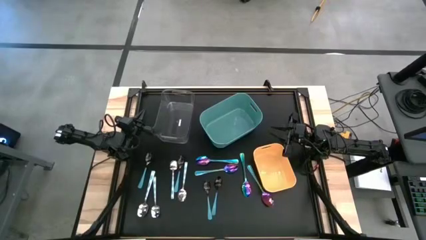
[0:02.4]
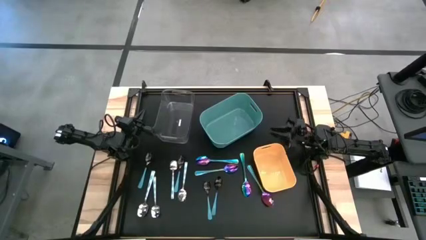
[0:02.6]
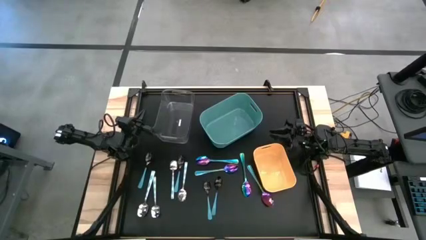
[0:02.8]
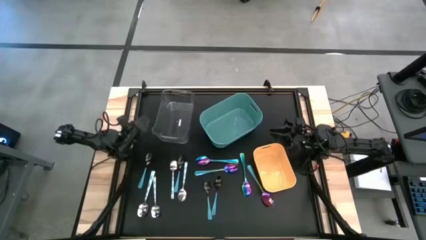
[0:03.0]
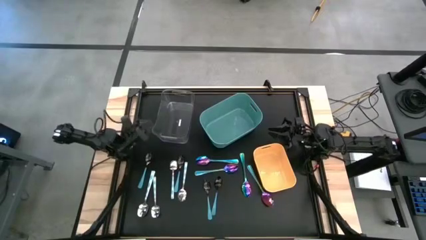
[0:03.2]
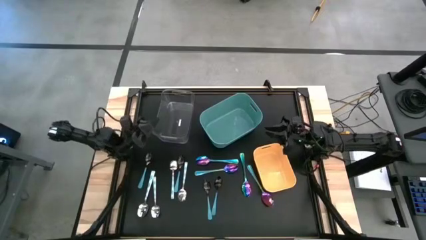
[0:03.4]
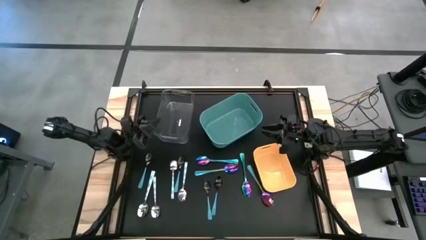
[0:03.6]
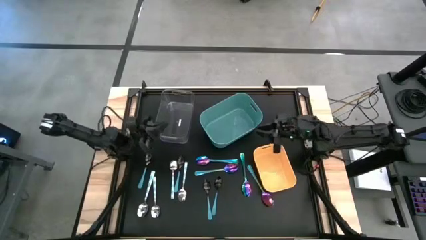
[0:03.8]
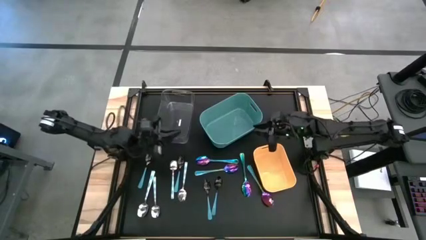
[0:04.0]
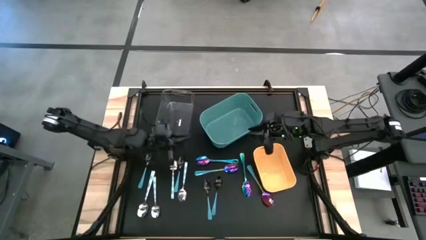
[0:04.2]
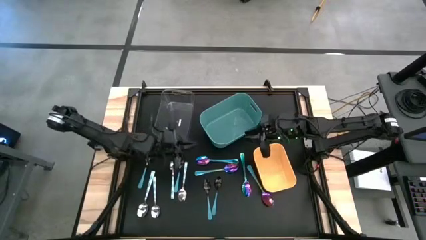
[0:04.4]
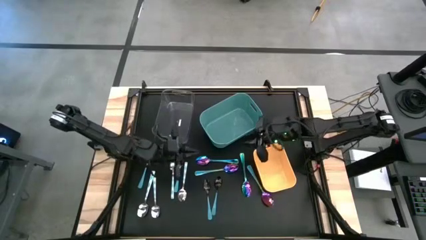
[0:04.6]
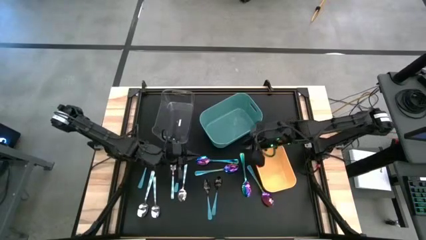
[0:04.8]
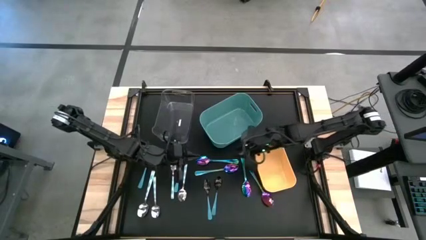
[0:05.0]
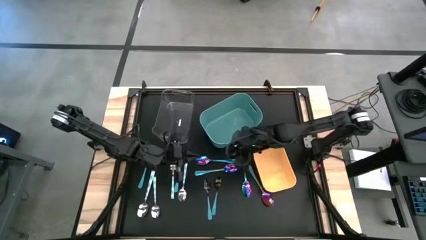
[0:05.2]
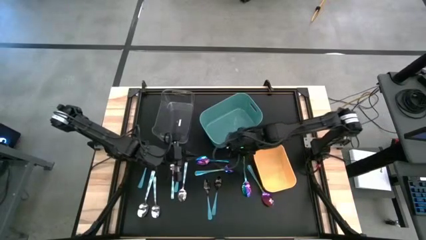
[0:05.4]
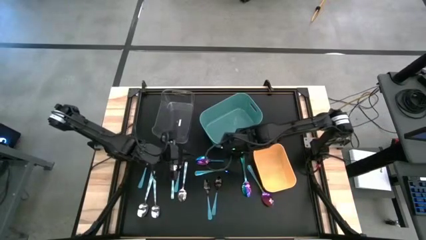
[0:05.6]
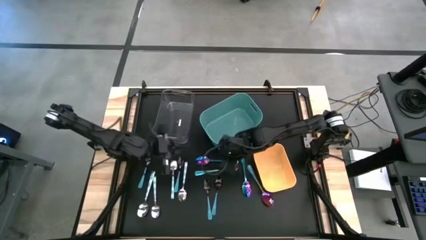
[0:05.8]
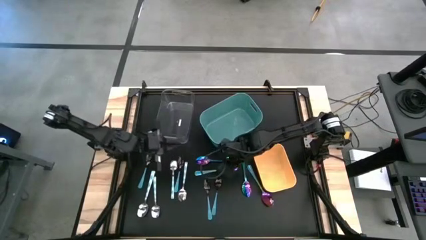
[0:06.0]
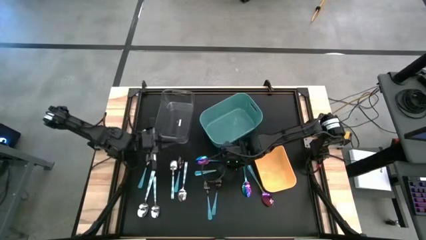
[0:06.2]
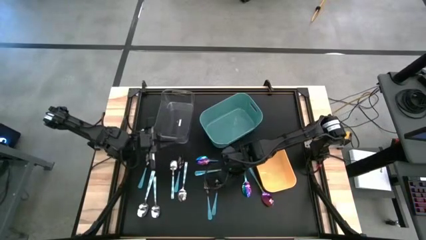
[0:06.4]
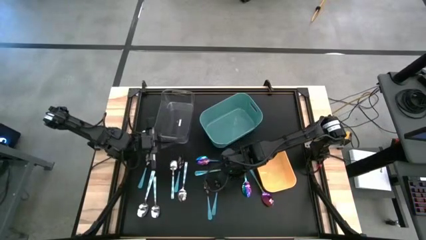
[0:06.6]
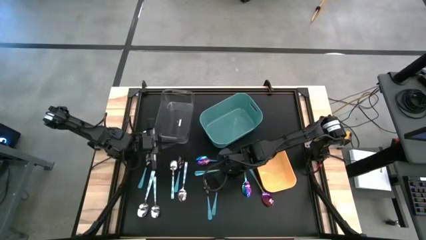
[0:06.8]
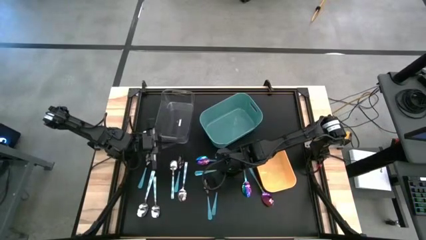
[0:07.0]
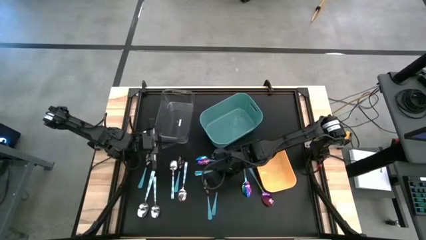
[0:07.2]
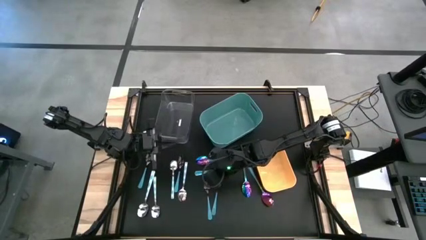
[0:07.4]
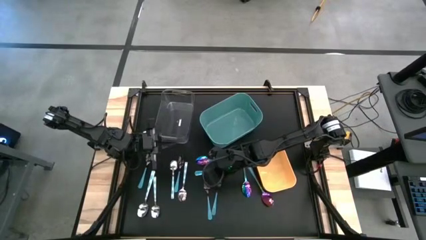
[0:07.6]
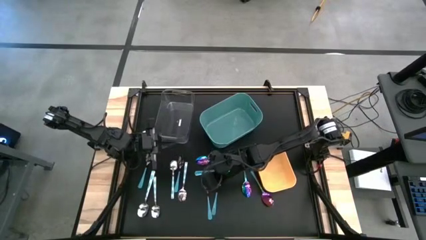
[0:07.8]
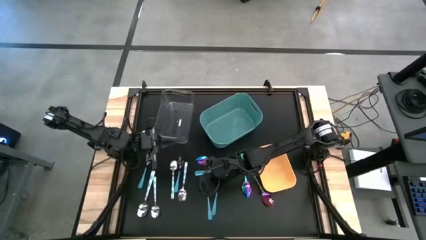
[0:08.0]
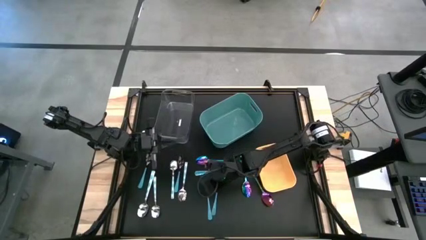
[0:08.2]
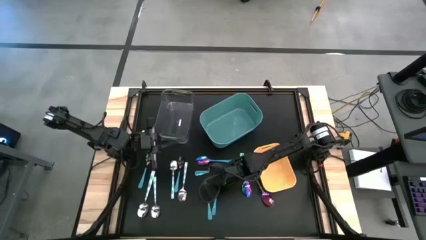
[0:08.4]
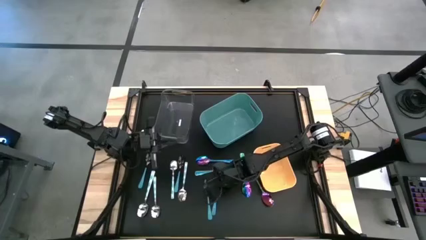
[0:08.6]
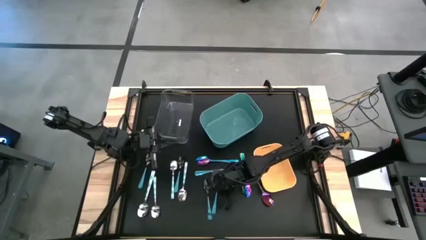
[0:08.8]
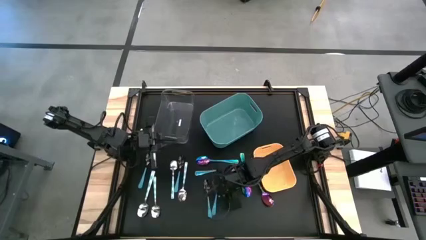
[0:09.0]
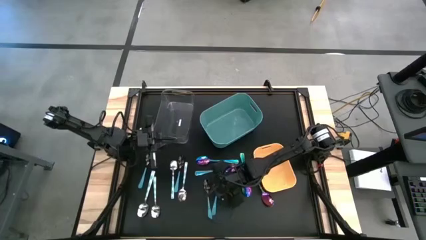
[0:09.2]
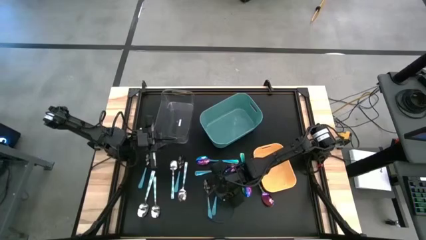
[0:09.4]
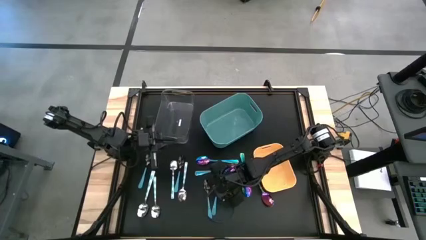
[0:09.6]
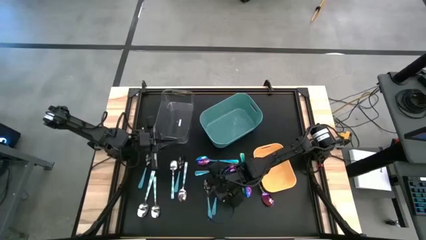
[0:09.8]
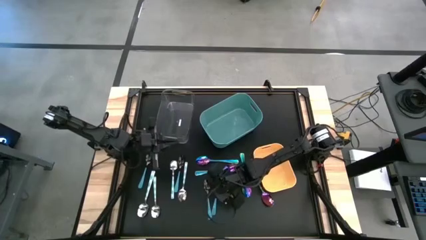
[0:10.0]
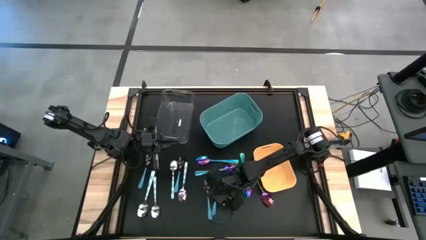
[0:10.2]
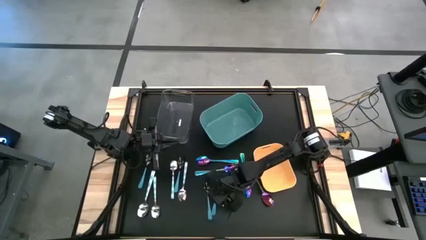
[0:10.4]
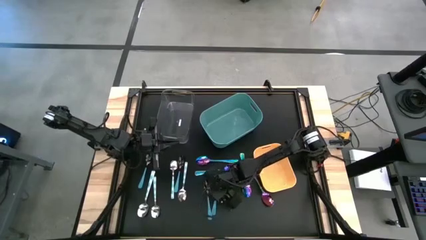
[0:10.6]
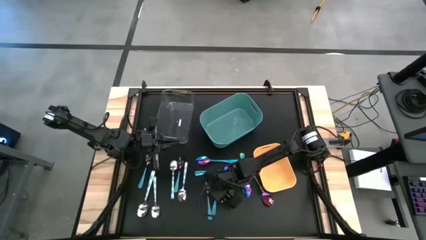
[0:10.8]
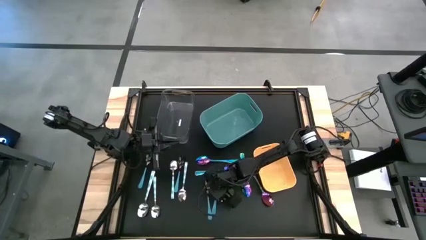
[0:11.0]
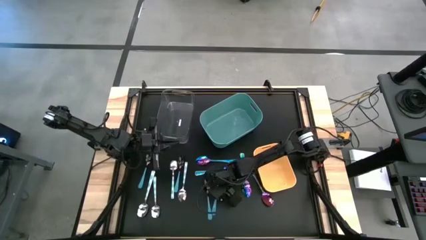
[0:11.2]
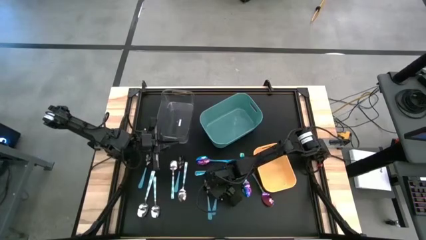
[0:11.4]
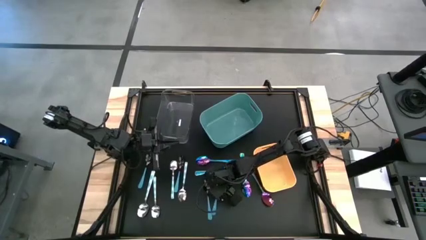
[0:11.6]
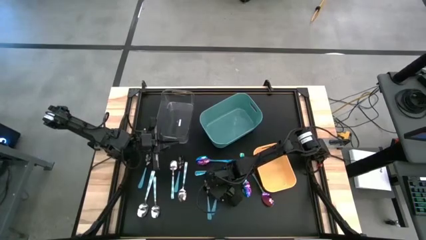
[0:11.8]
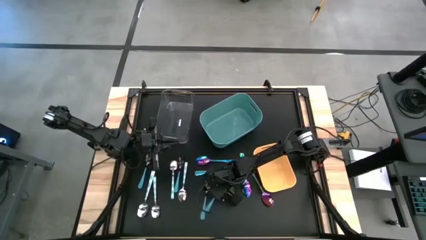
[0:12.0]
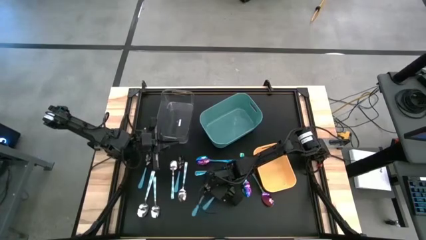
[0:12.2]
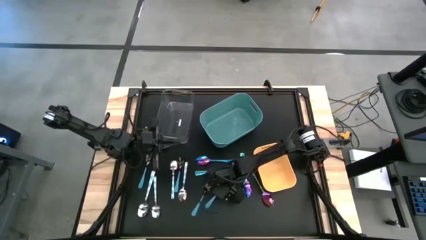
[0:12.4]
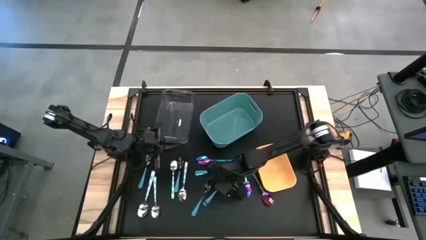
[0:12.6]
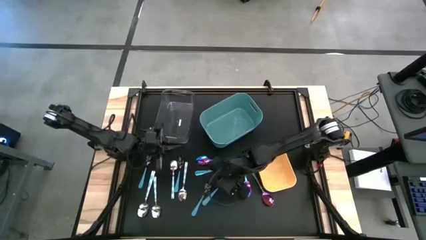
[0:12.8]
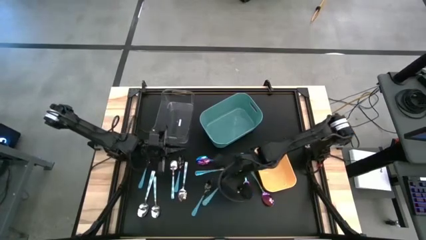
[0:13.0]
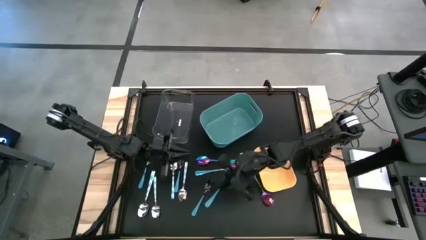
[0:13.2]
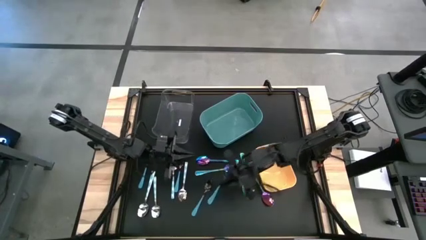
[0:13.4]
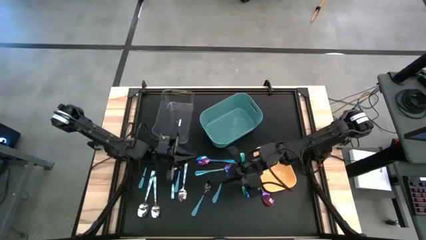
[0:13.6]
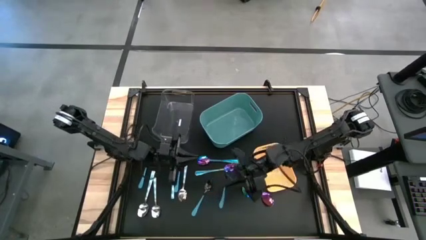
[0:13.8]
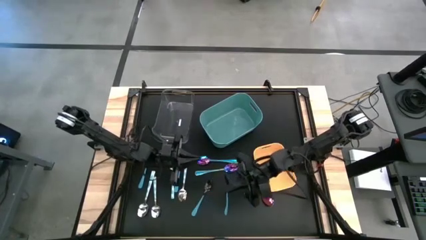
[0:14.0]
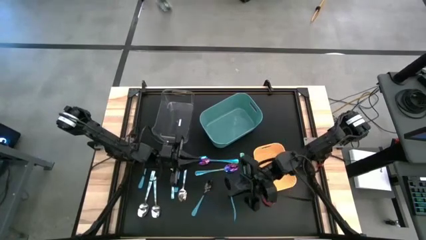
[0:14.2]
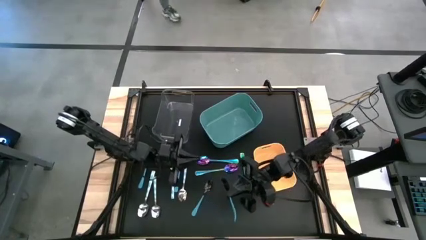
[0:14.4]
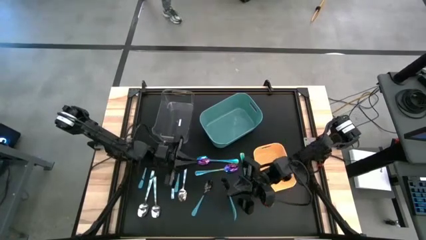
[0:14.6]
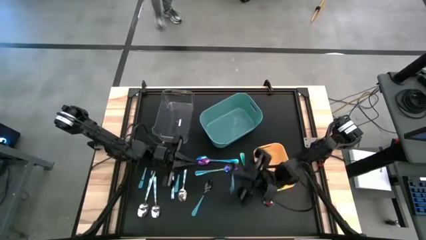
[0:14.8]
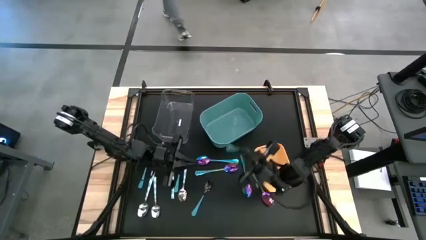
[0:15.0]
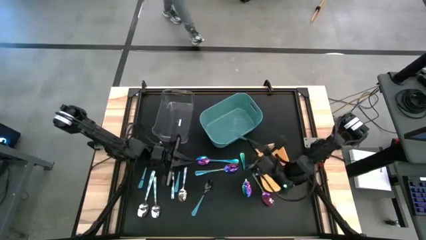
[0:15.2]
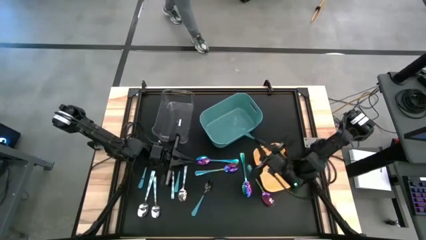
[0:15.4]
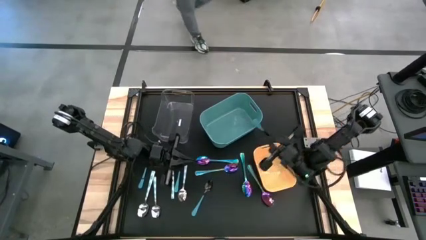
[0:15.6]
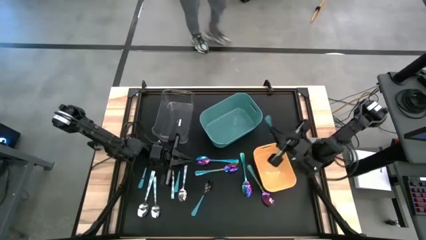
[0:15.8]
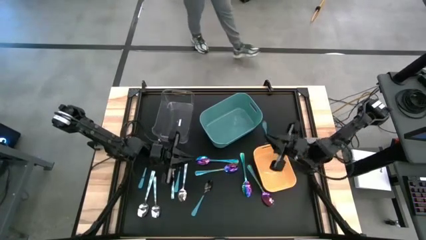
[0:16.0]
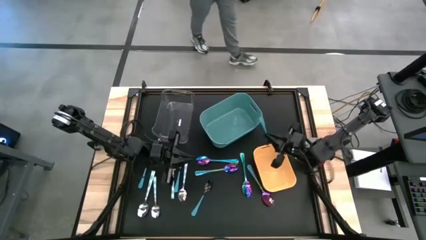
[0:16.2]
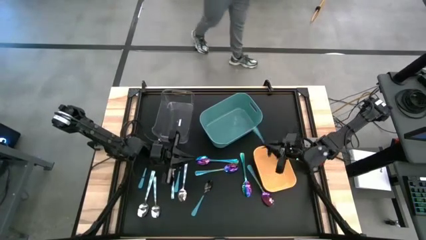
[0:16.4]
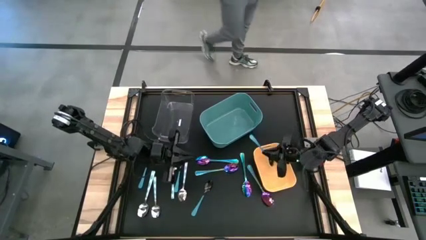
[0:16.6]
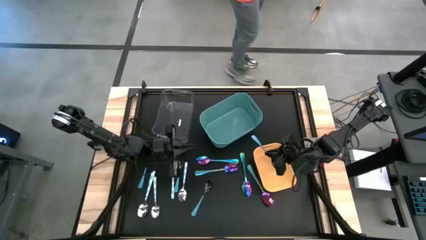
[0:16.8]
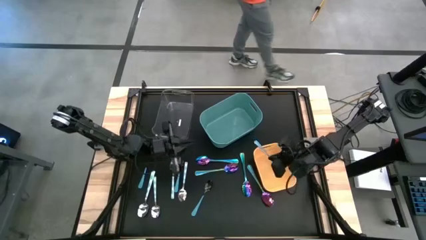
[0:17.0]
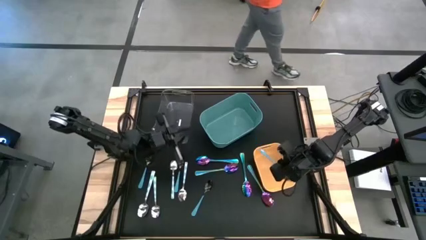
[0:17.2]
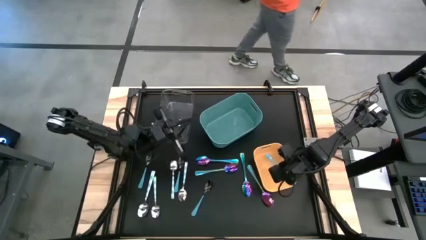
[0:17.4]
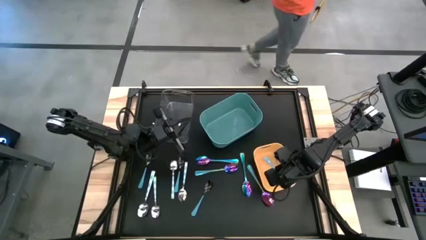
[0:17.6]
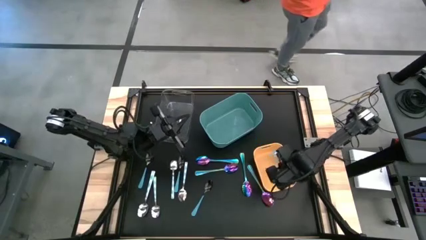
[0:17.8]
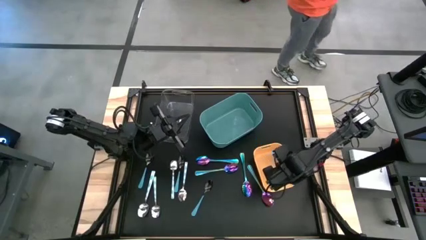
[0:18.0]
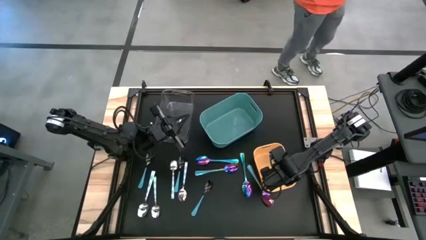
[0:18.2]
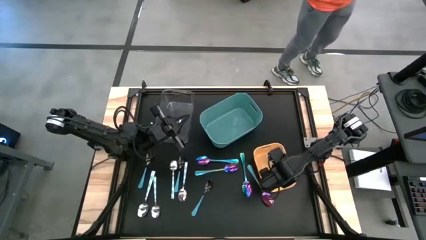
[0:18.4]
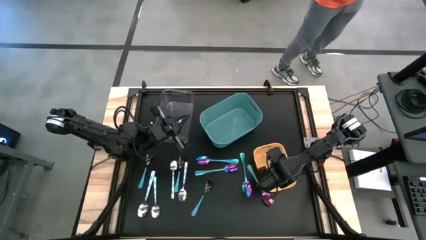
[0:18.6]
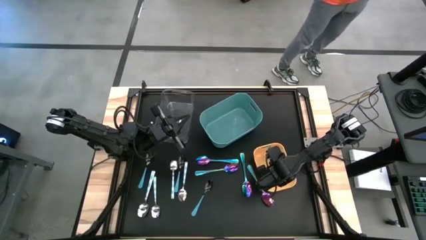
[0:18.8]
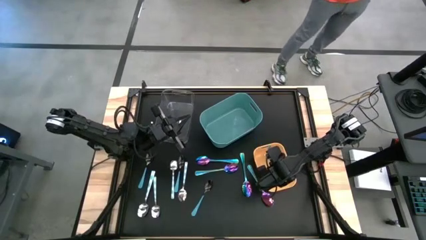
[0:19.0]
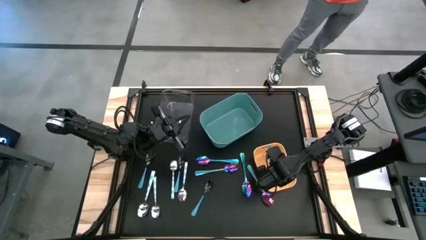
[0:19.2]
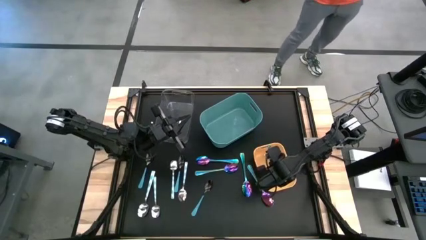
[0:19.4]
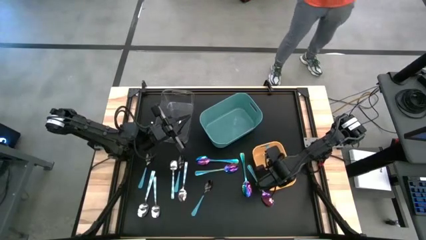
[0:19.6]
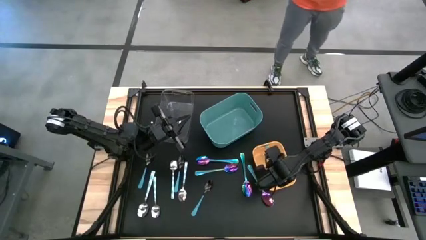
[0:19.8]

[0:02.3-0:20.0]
Task: Sort silverware by color (type)
Put the black spoon into the yellow bin
